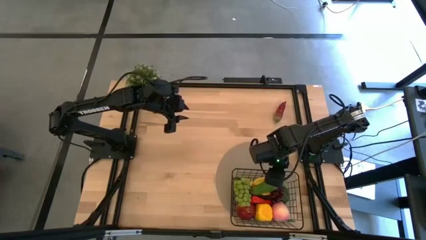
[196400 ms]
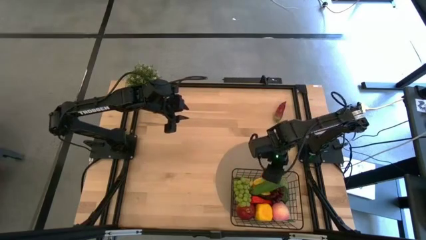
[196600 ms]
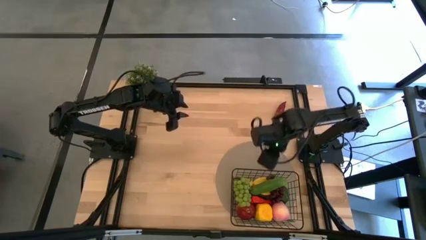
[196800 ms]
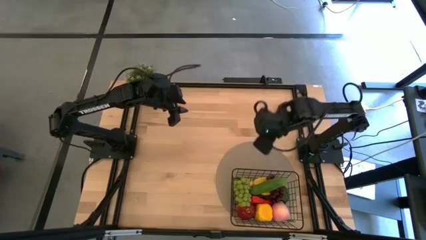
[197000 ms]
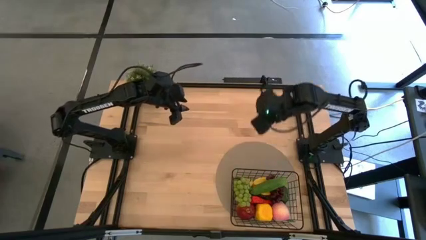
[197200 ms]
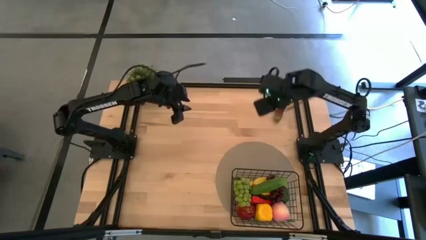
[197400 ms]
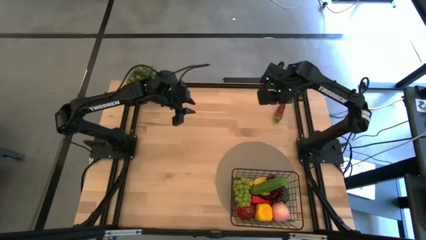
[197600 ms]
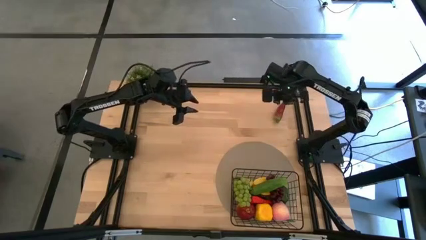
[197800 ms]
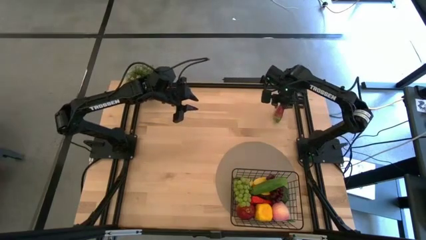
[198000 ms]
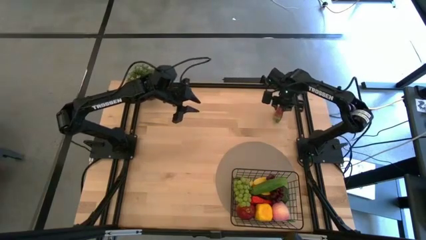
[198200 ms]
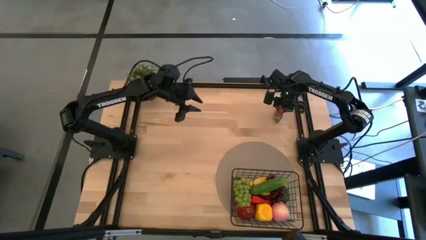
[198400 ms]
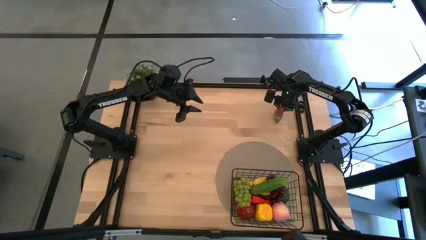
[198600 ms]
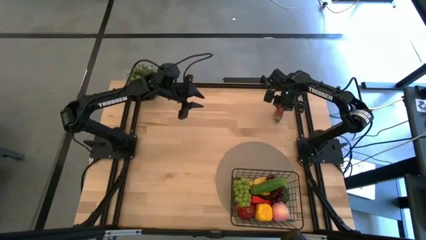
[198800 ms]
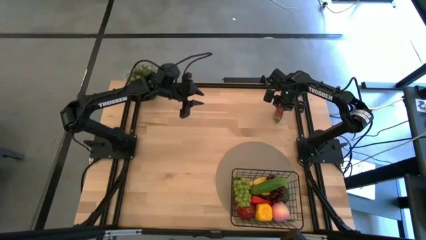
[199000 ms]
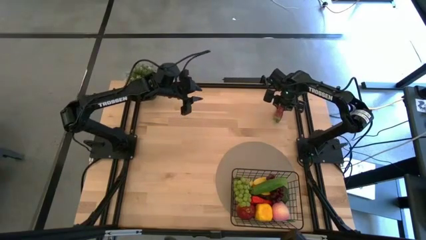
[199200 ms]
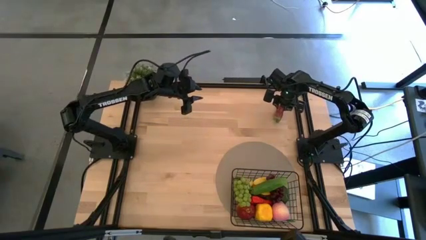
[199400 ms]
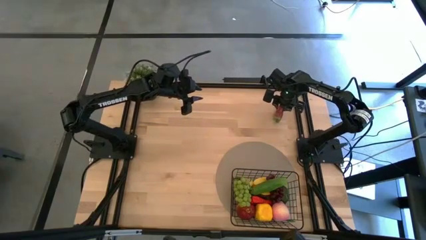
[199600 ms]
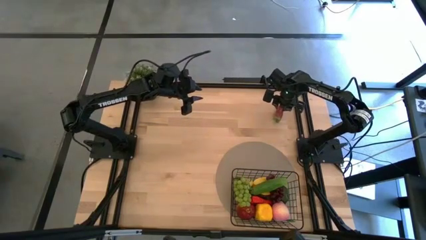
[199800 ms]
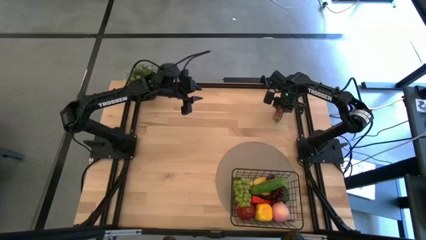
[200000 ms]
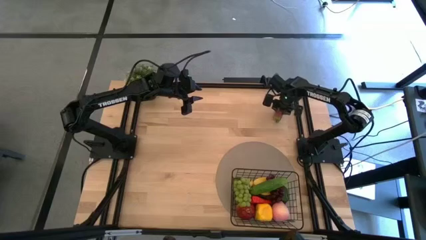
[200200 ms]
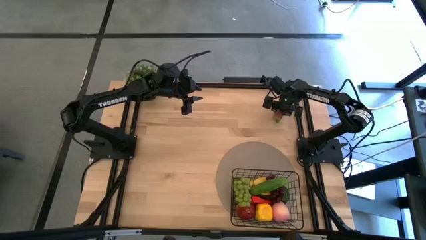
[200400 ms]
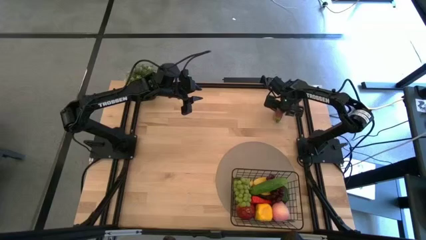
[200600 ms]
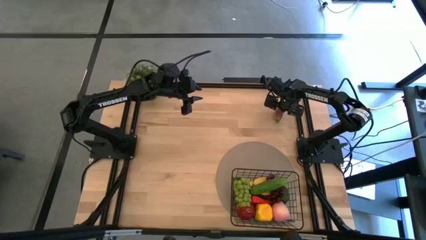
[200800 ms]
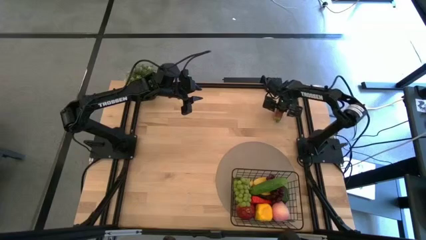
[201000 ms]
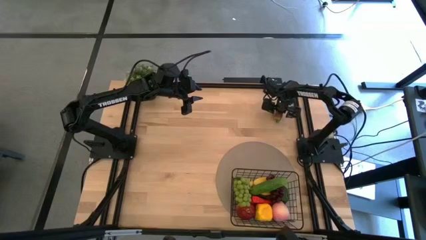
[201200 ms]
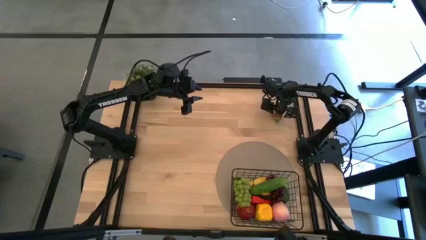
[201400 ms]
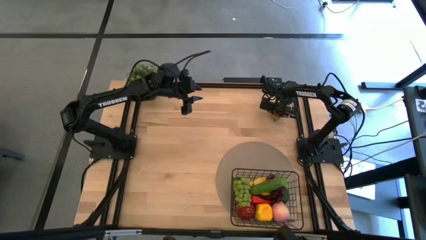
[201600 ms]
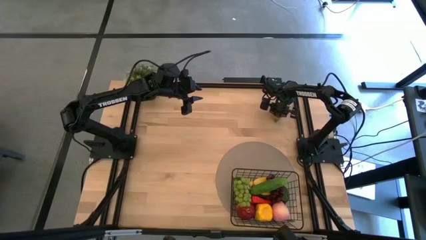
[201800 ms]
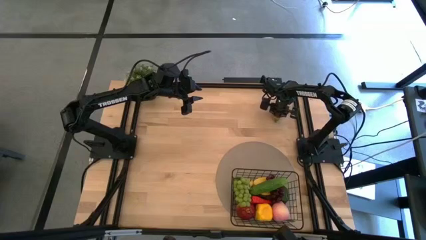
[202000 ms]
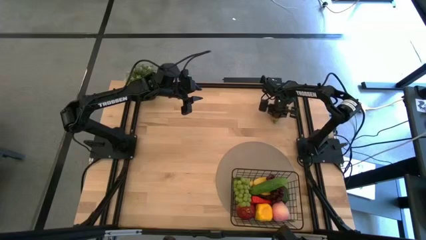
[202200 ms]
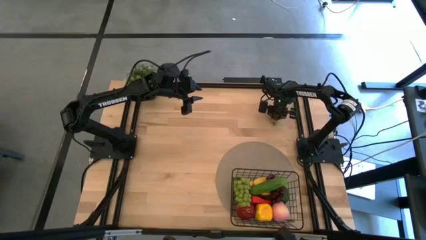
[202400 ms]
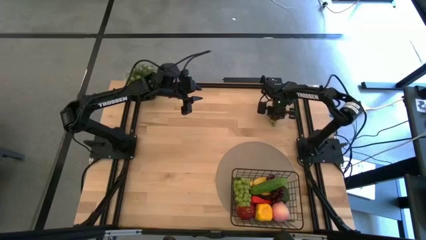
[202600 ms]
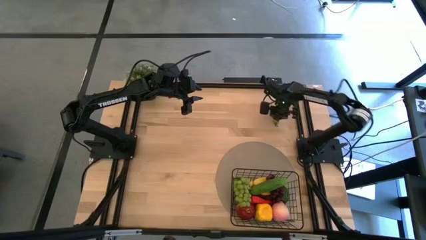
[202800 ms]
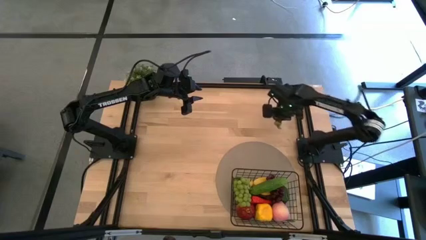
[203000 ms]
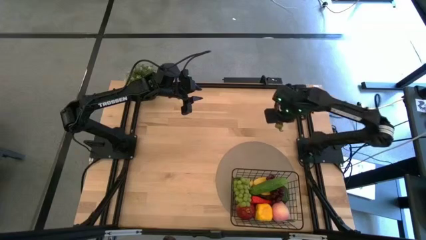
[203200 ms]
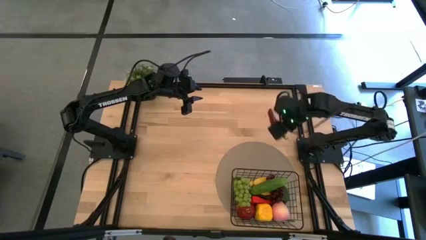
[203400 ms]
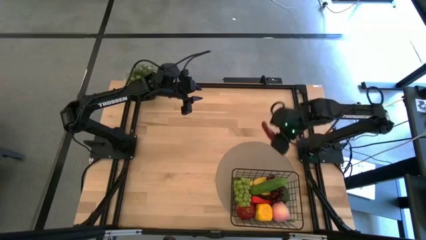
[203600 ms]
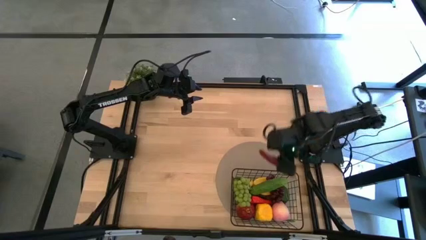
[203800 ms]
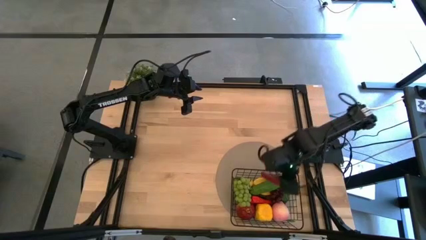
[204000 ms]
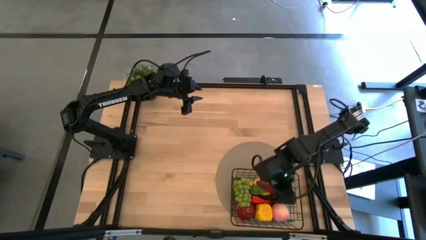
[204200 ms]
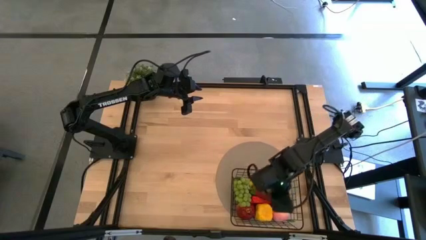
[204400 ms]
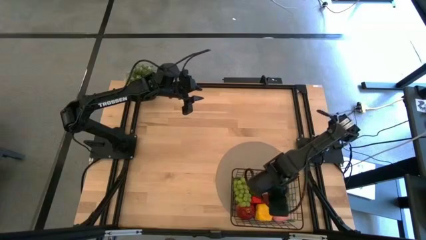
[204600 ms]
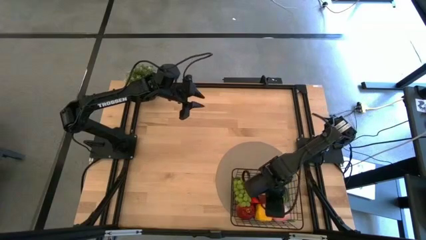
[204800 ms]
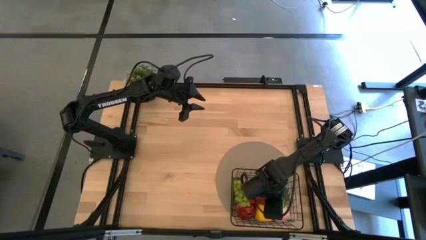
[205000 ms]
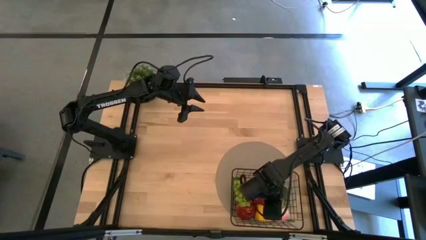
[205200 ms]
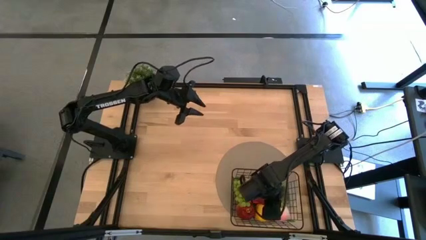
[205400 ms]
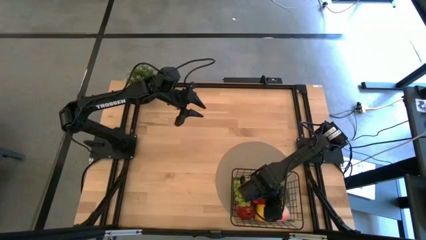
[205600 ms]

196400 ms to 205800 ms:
Task: Build produce basket
Put the red pepper into the wire basket

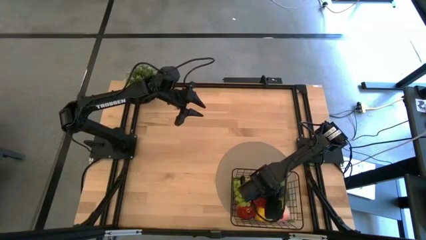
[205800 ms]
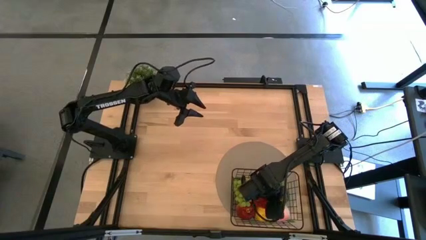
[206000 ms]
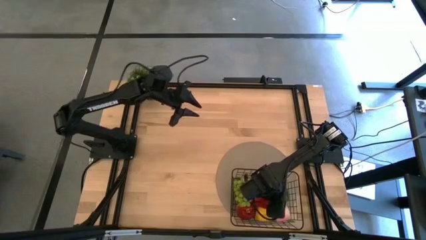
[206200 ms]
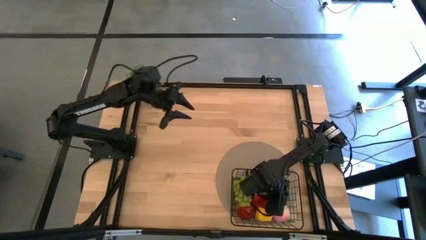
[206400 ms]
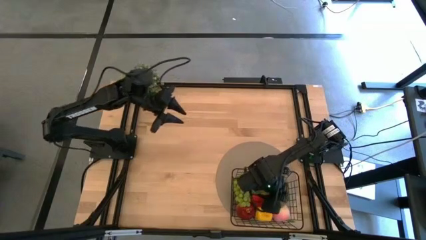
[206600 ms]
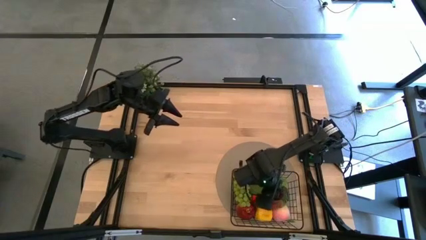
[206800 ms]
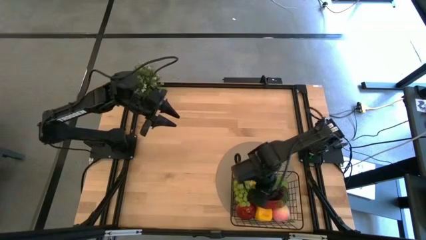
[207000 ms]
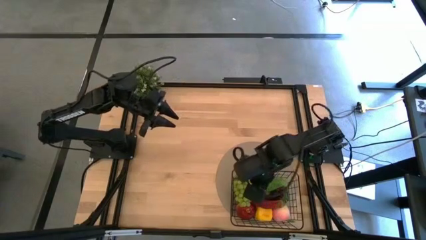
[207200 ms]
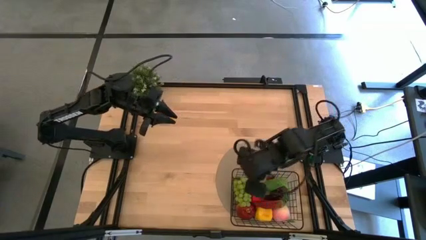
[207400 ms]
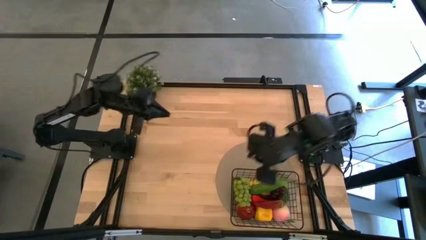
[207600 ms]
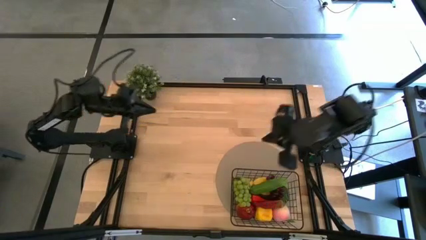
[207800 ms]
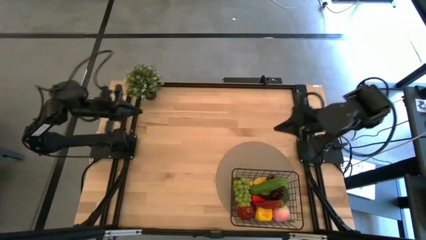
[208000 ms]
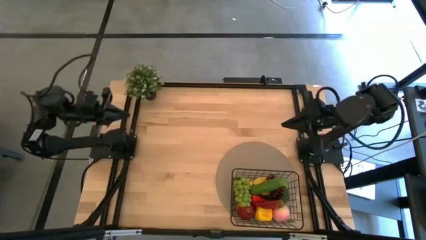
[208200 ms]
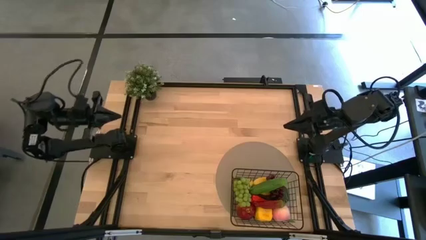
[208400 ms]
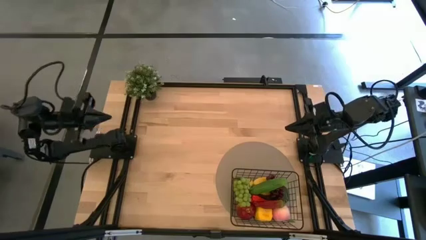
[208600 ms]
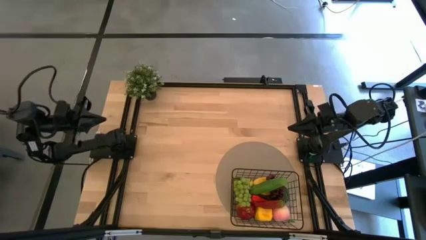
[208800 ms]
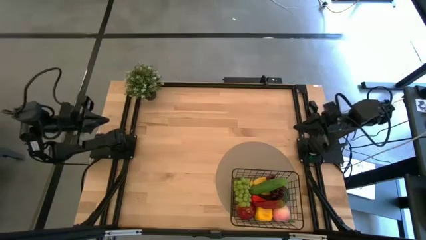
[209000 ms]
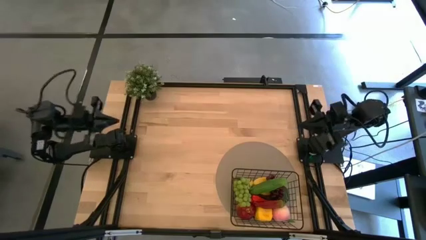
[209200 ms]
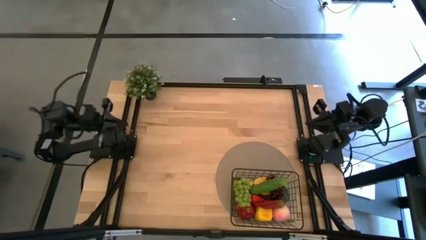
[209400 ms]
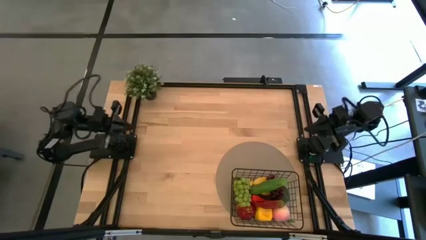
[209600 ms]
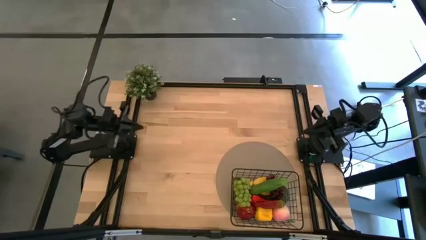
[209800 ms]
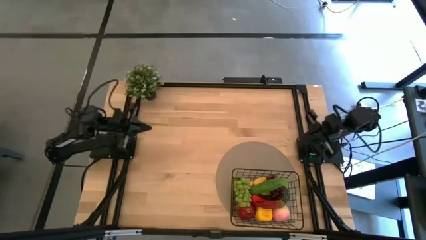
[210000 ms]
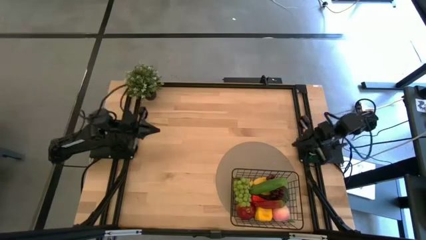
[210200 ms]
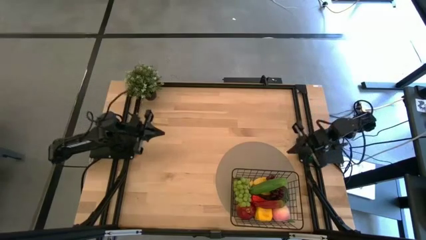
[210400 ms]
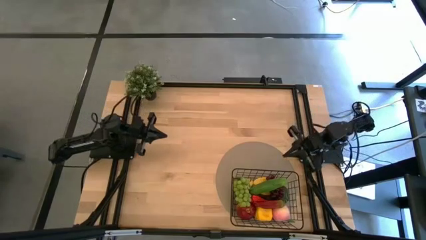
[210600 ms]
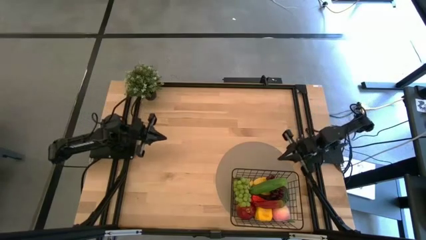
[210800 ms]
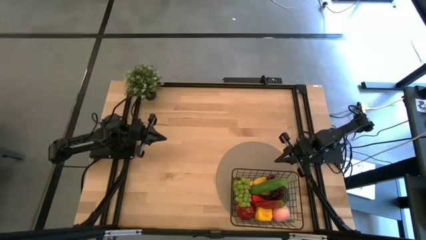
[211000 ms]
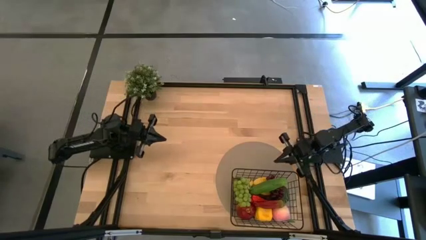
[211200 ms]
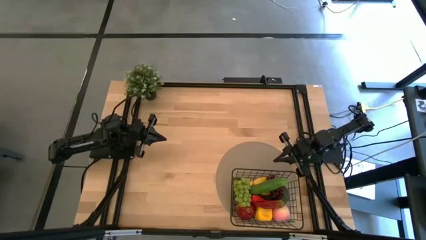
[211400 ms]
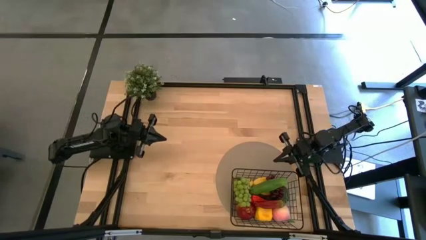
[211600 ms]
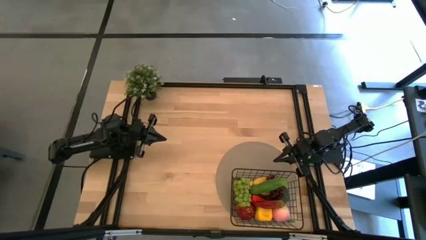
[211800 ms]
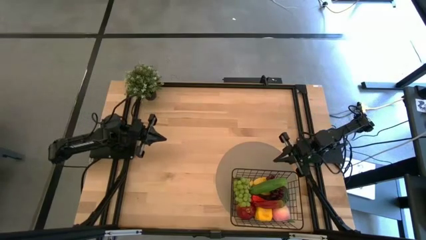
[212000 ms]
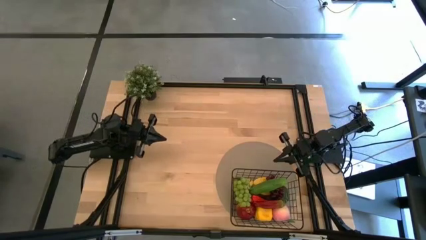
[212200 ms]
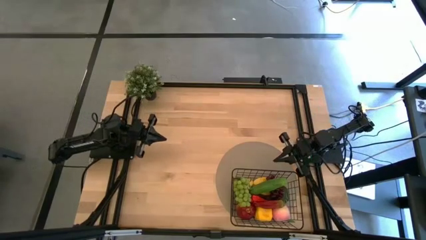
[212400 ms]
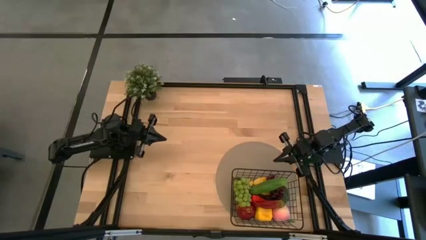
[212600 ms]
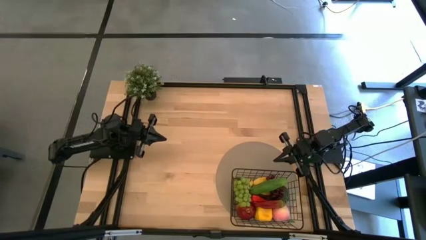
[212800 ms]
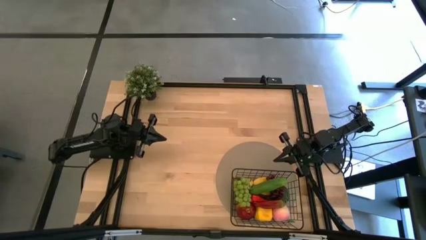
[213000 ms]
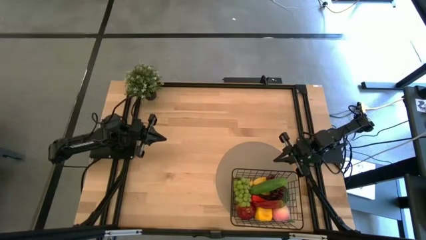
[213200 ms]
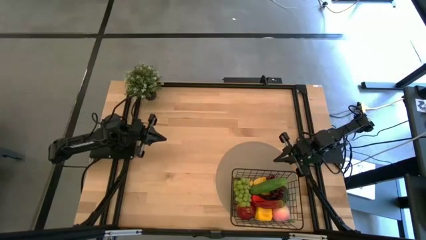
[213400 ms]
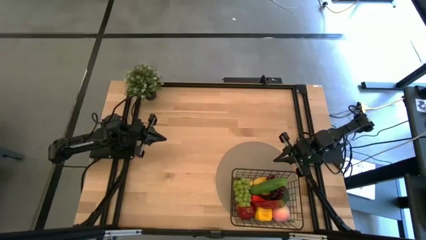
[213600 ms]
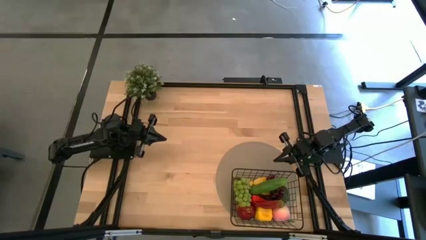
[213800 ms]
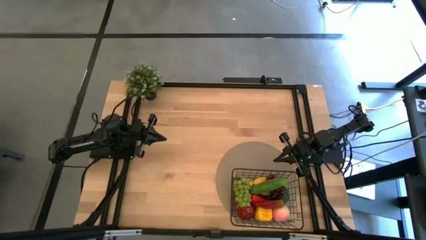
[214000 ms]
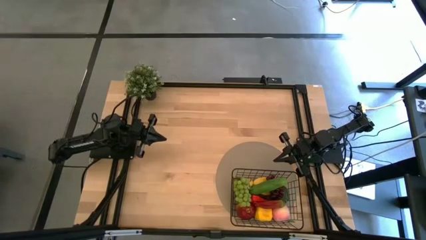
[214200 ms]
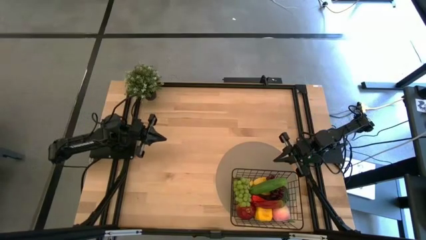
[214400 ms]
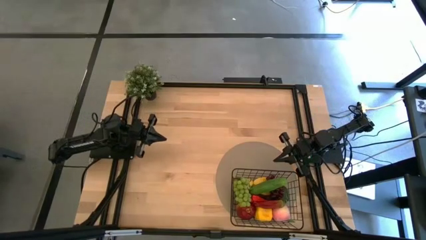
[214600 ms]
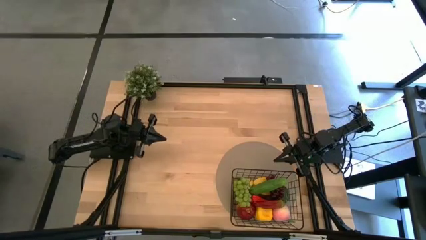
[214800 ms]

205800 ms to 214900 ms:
Return to Home Position
